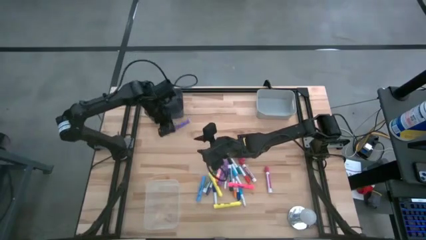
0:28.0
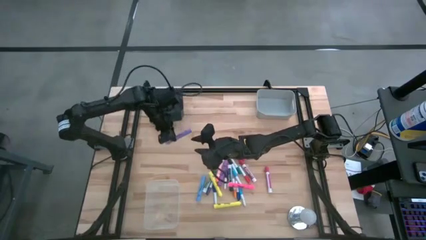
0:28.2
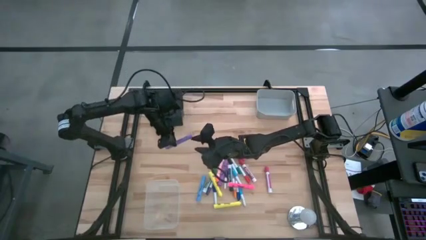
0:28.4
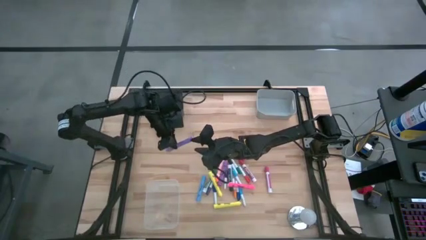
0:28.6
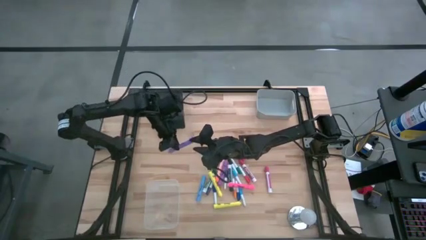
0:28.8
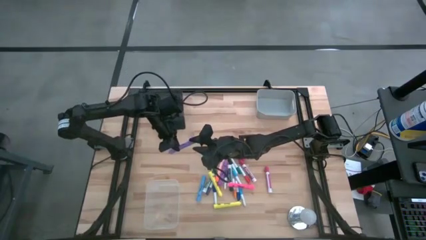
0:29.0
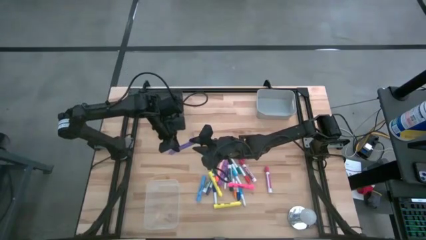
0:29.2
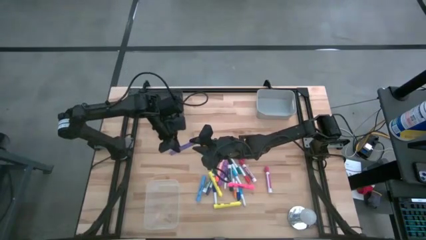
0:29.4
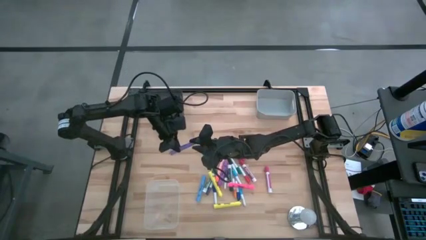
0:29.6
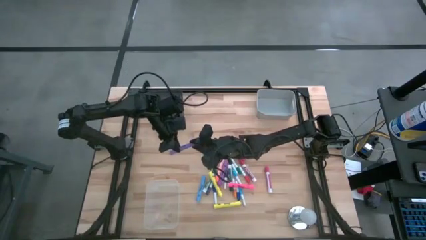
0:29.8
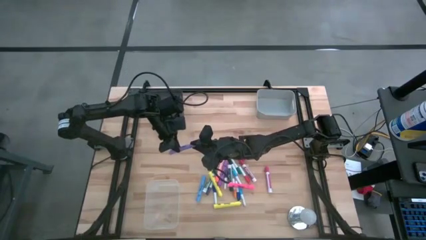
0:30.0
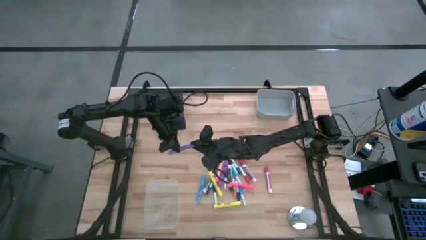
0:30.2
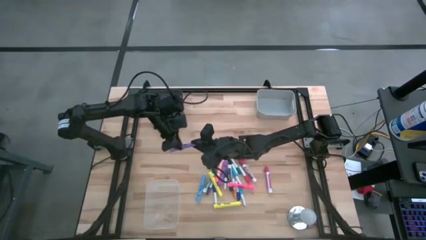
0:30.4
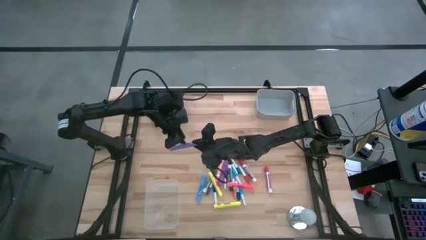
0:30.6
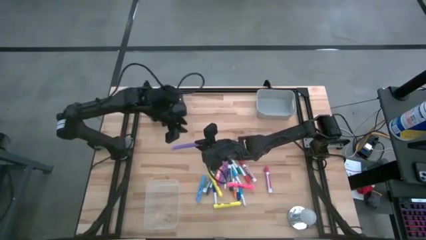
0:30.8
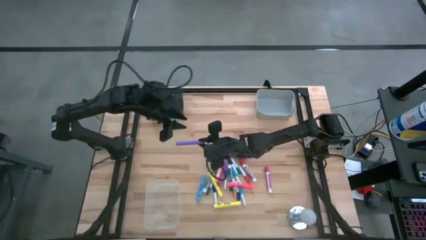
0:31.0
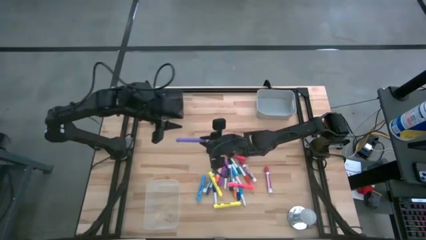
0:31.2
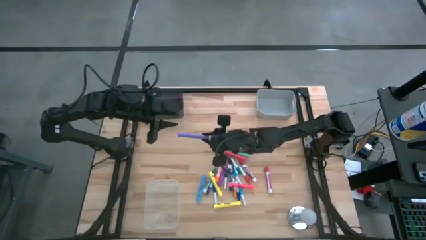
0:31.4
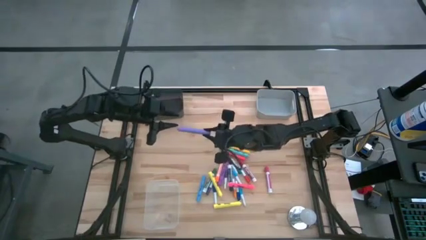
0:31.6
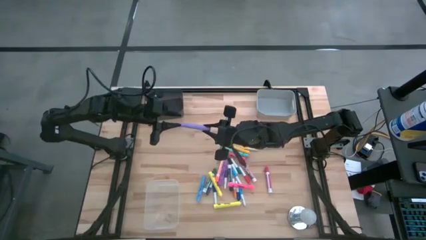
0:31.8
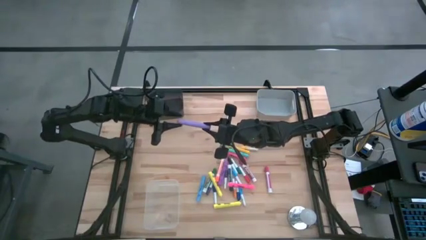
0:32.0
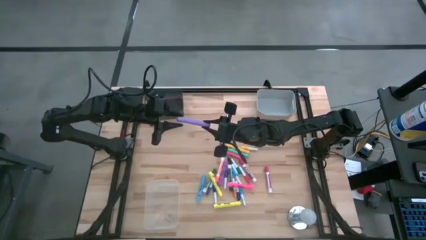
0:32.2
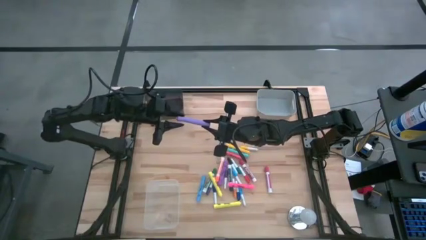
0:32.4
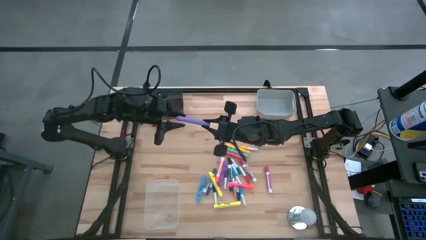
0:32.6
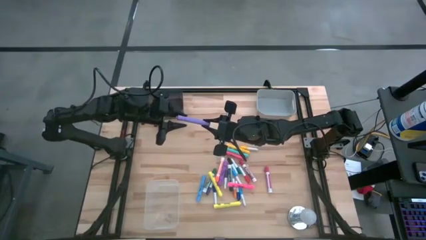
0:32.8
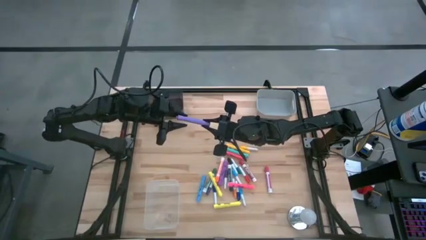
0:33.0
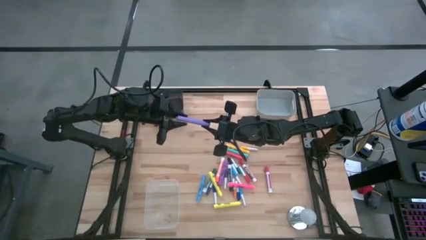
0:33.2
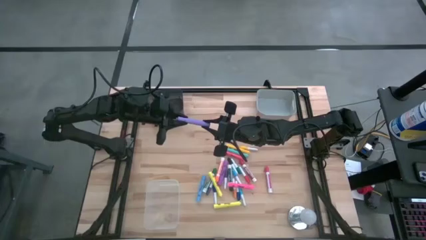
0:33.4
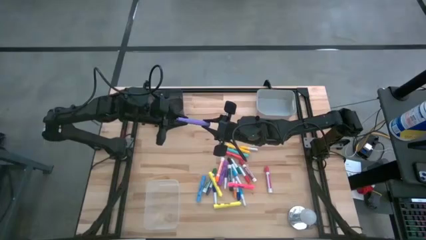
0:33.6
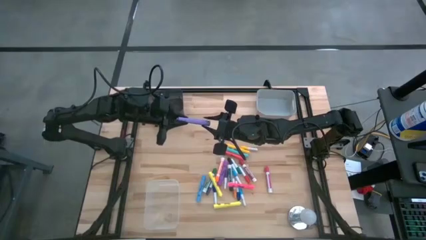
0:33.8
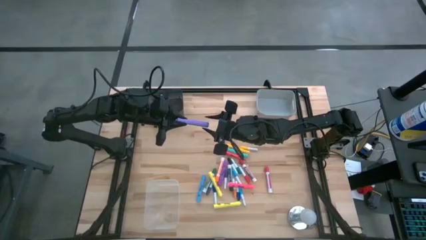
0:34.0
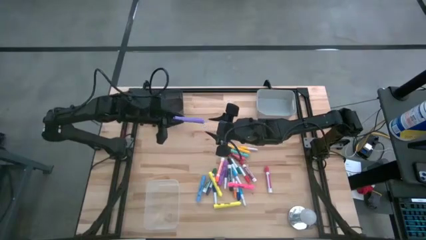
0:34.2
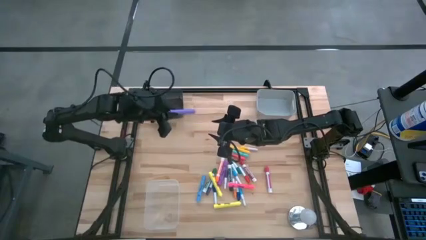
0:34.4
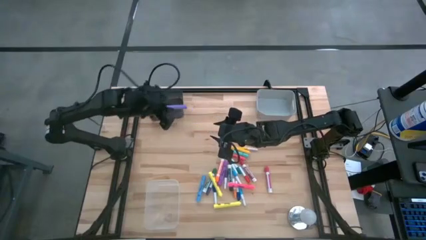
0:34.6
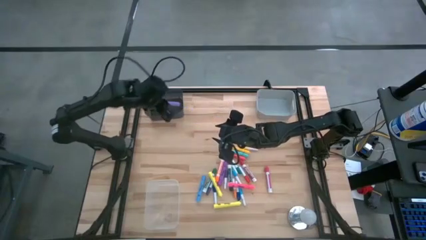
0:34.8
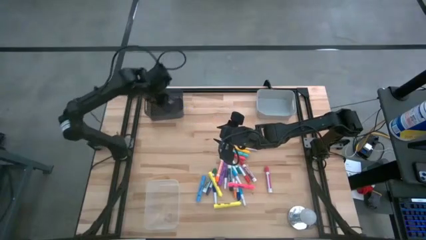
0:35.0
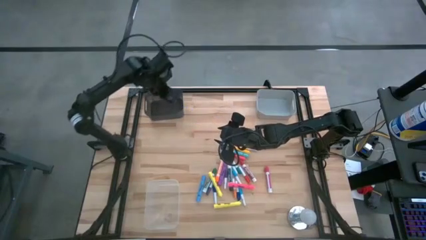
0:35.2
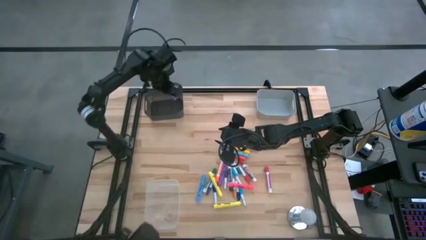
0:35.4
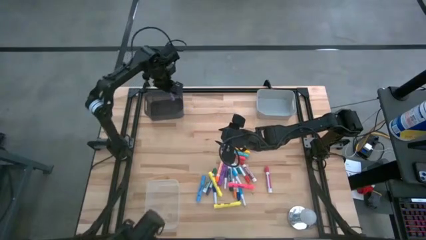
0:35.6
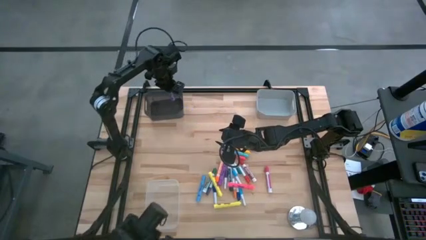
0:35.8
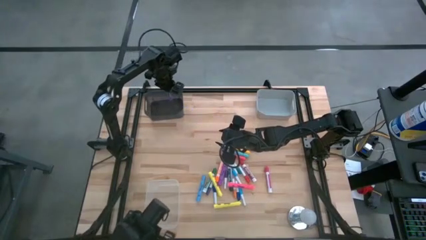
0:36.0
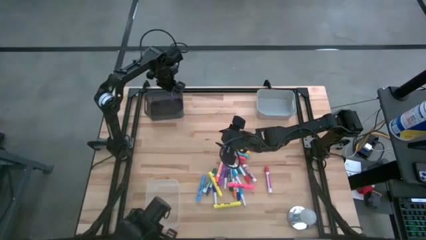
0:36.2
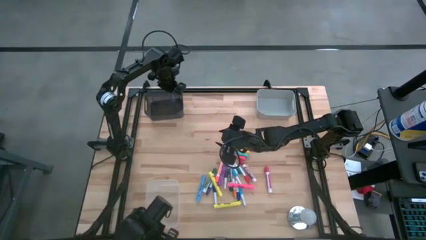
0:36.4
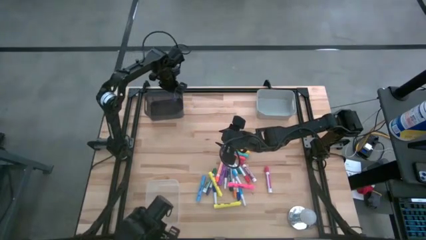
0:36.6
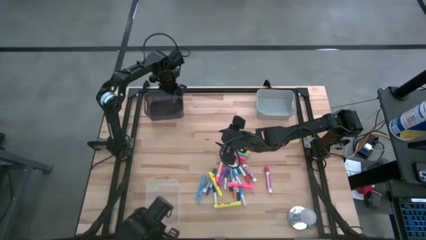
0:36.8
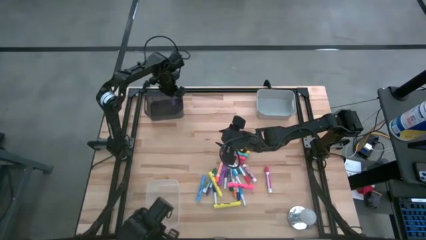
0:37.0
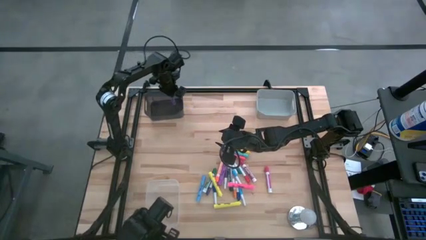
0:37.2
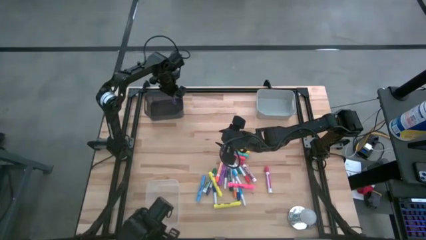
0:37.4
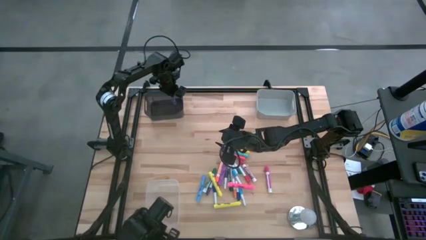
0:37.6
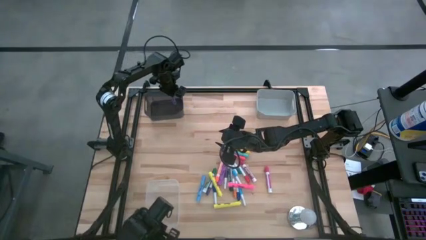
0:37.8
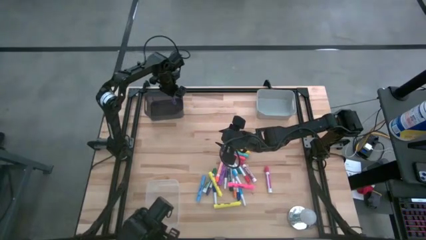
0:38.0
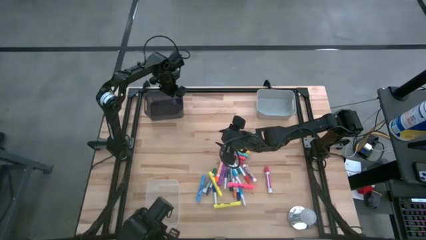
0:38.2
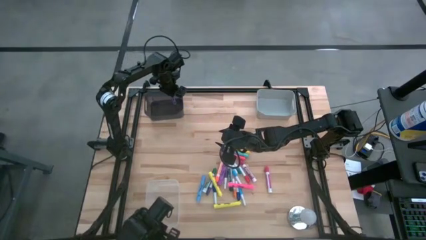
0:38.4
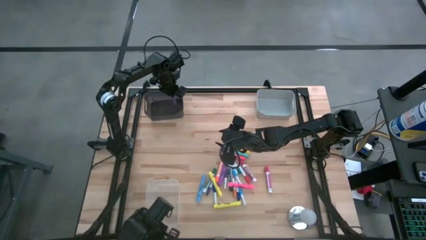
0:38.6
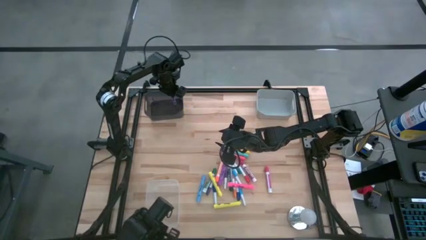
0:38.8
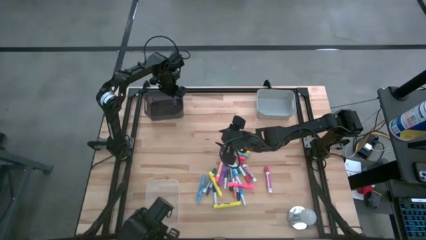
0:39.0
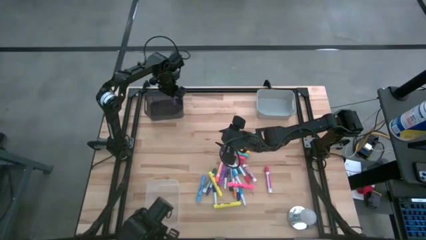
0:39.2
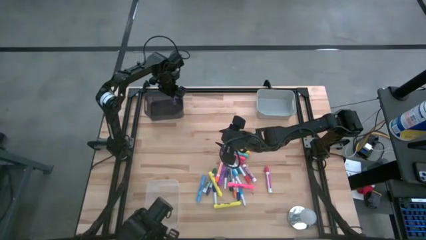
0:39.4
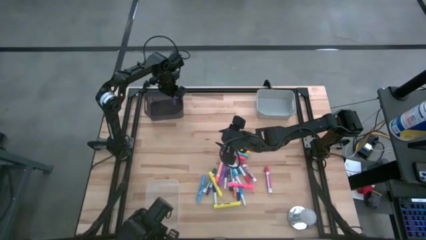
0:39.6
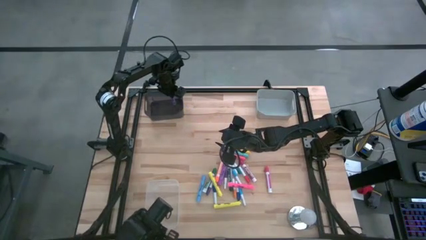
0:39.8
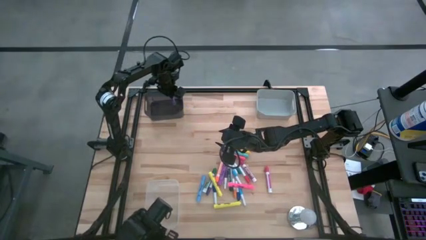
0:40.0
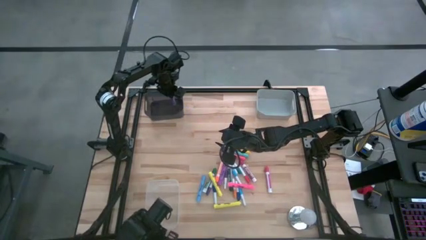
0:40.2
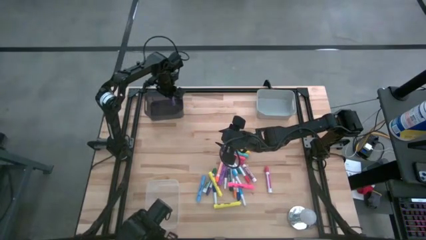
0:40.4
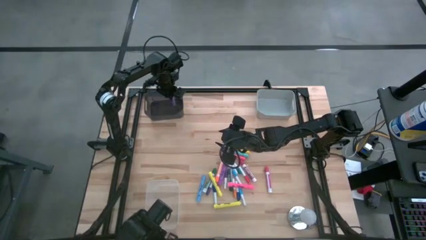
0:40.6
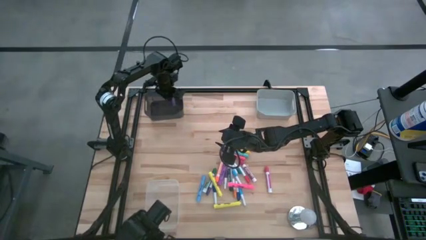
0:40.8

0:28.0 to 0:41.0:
Task: Pick & Place Markers
Put the violet highlighter pen into the black bin
